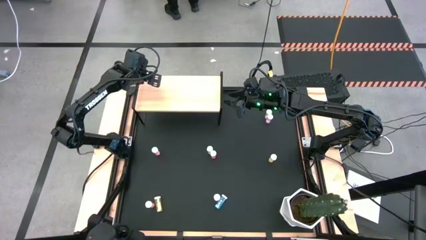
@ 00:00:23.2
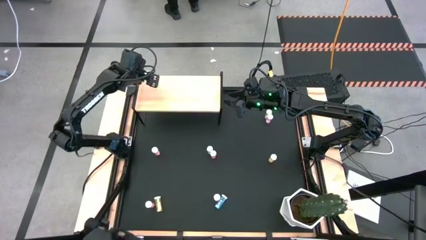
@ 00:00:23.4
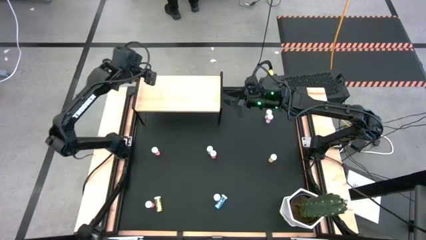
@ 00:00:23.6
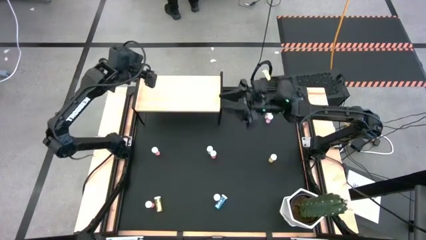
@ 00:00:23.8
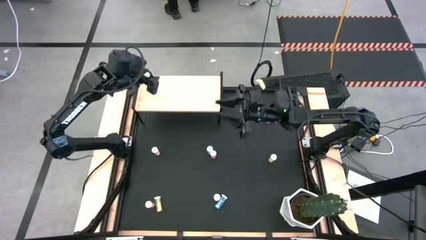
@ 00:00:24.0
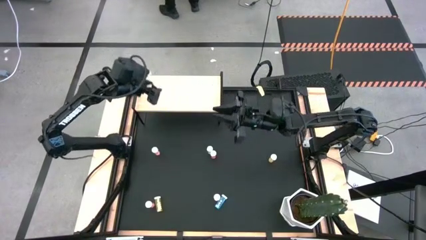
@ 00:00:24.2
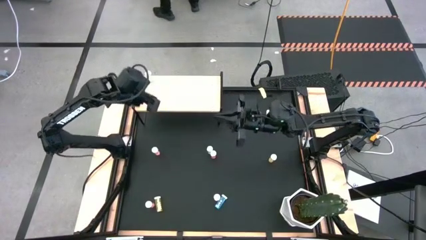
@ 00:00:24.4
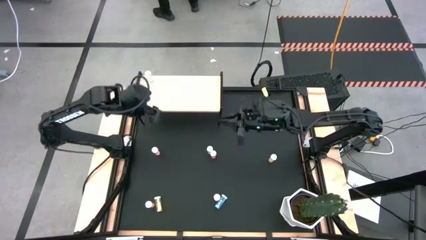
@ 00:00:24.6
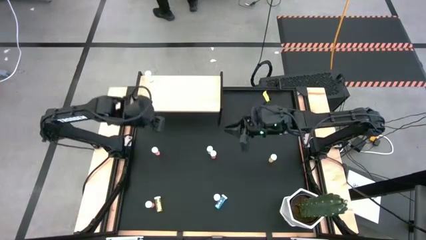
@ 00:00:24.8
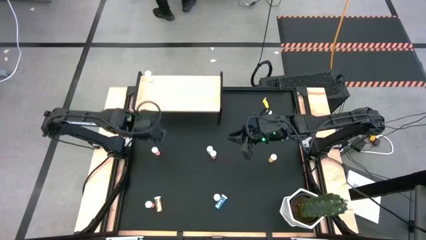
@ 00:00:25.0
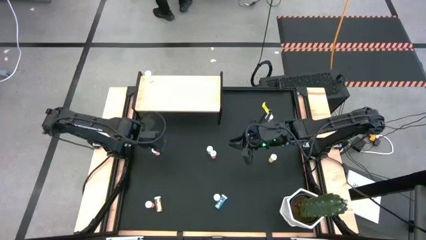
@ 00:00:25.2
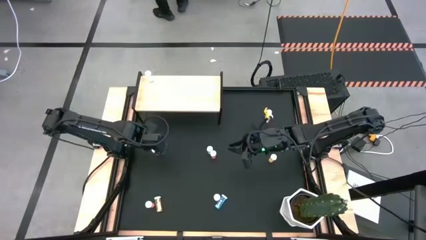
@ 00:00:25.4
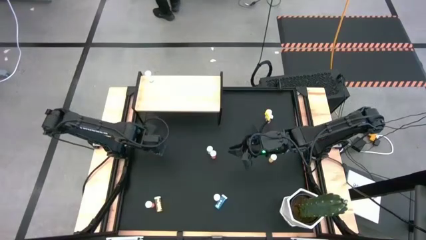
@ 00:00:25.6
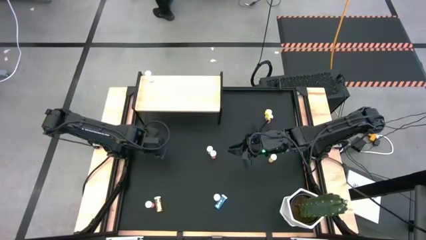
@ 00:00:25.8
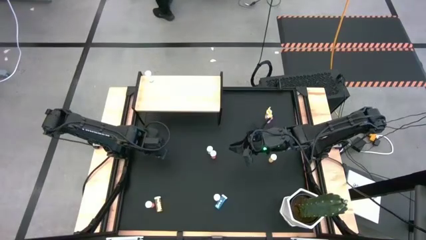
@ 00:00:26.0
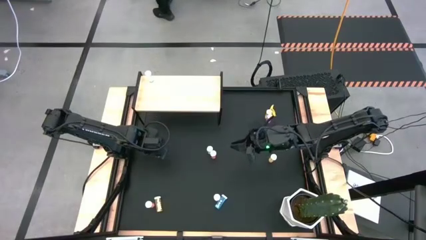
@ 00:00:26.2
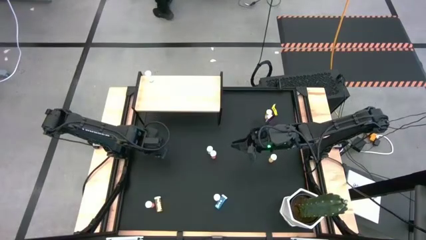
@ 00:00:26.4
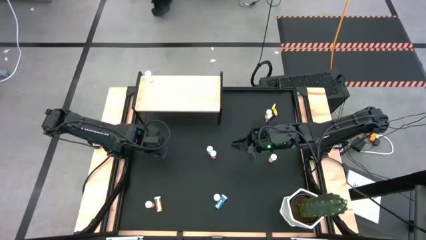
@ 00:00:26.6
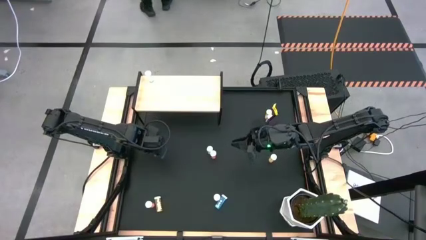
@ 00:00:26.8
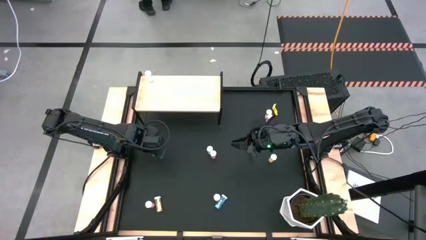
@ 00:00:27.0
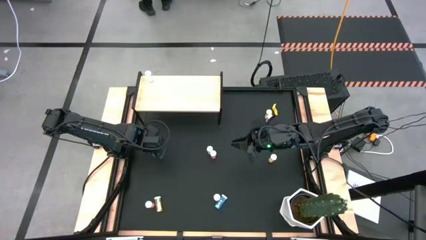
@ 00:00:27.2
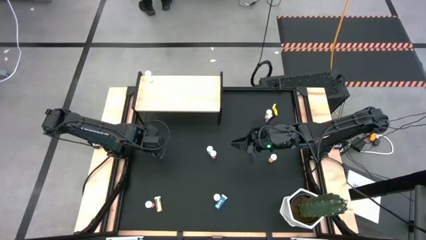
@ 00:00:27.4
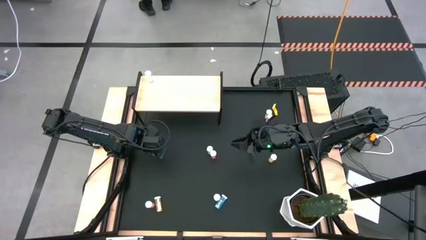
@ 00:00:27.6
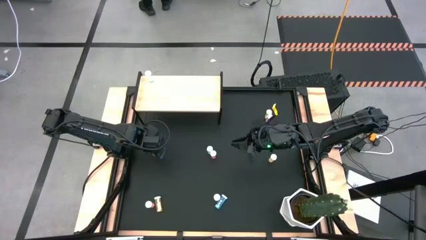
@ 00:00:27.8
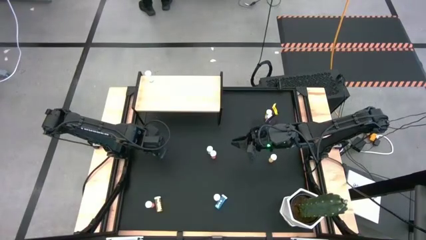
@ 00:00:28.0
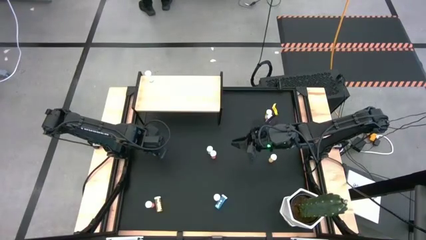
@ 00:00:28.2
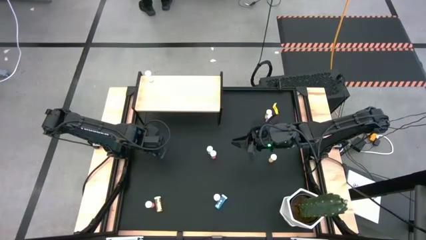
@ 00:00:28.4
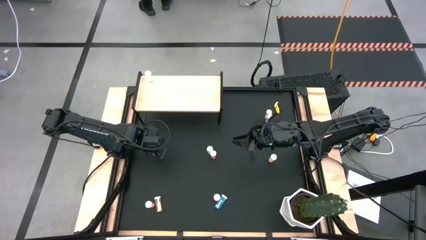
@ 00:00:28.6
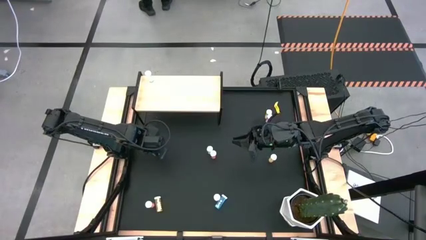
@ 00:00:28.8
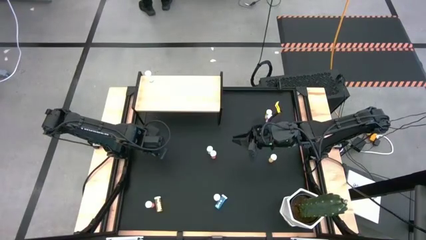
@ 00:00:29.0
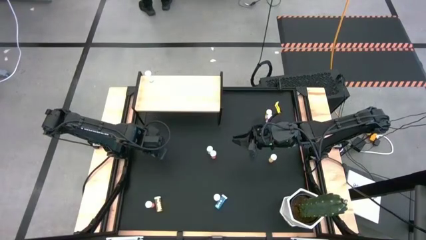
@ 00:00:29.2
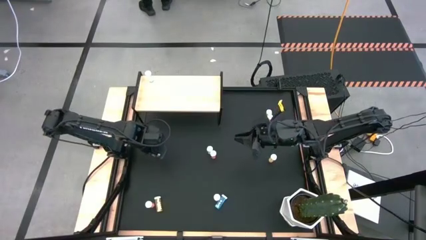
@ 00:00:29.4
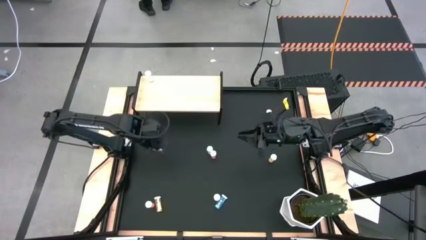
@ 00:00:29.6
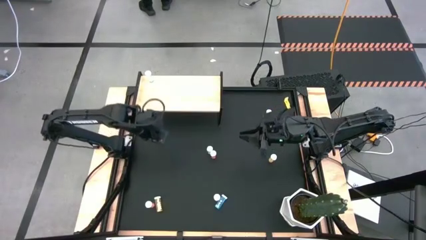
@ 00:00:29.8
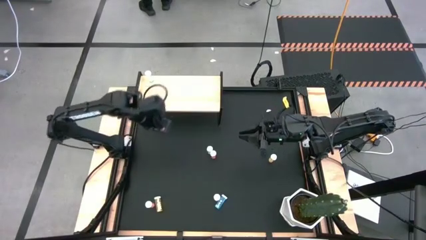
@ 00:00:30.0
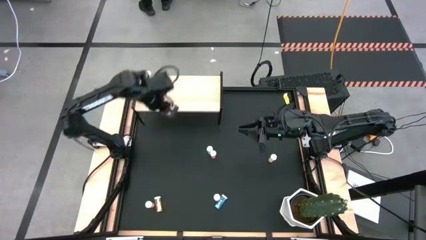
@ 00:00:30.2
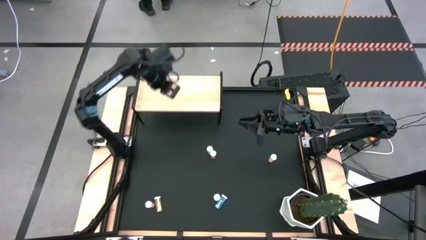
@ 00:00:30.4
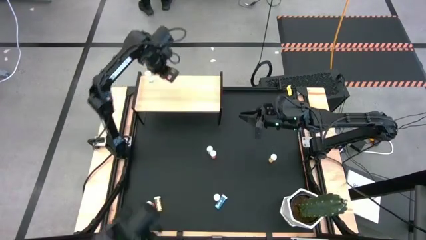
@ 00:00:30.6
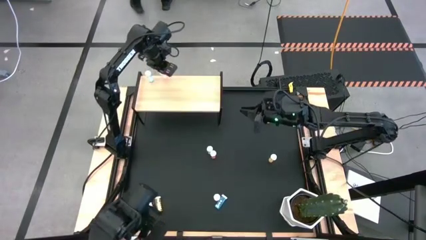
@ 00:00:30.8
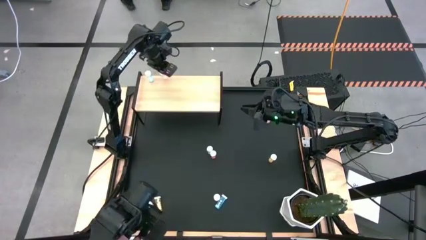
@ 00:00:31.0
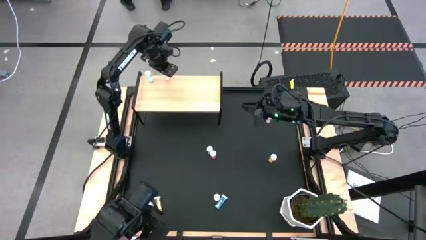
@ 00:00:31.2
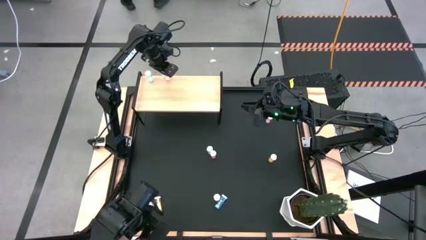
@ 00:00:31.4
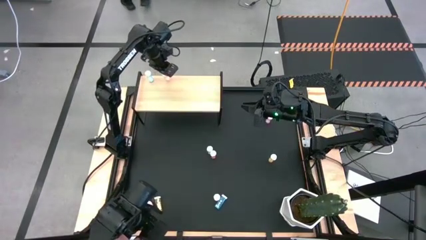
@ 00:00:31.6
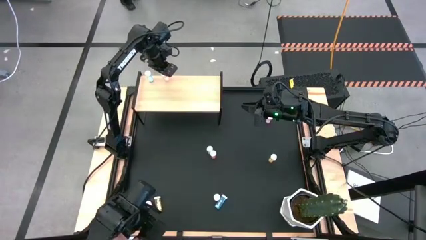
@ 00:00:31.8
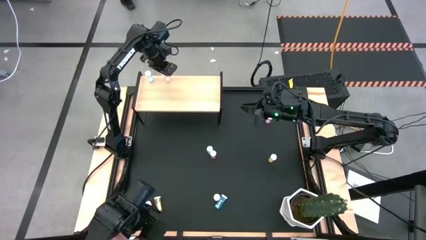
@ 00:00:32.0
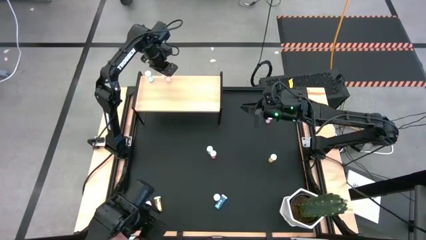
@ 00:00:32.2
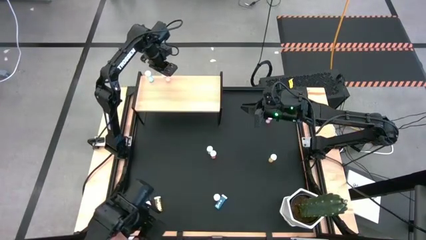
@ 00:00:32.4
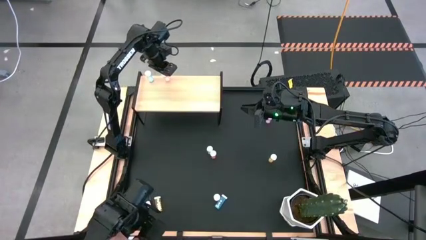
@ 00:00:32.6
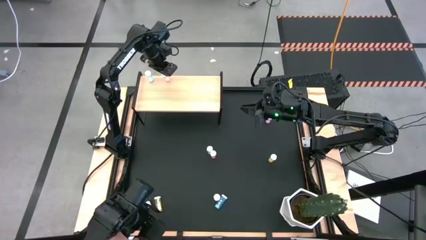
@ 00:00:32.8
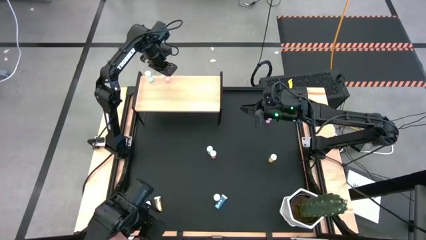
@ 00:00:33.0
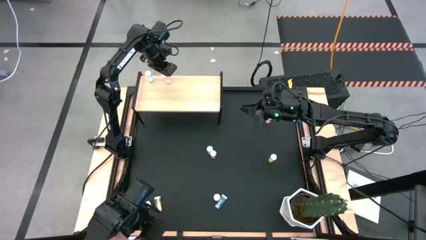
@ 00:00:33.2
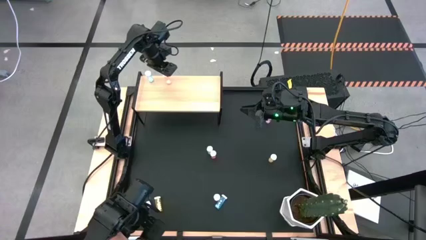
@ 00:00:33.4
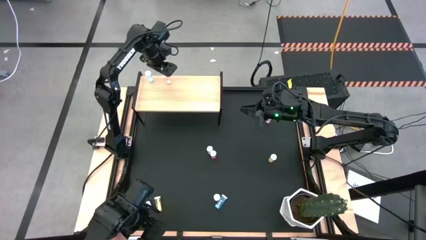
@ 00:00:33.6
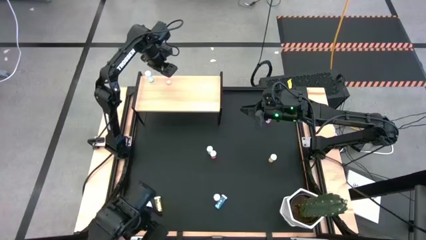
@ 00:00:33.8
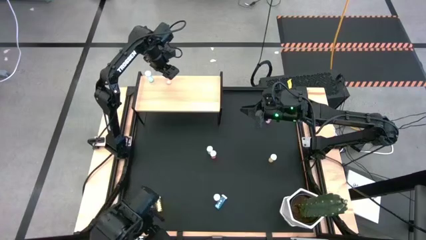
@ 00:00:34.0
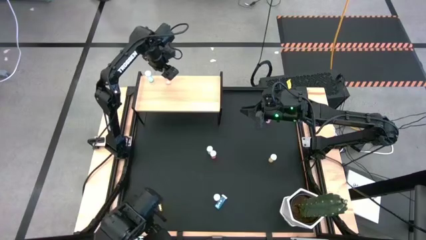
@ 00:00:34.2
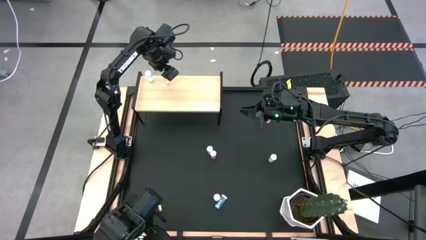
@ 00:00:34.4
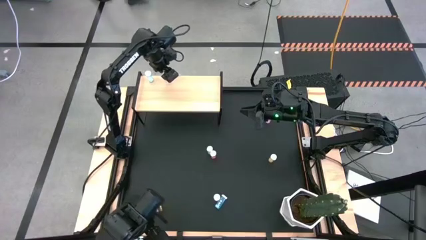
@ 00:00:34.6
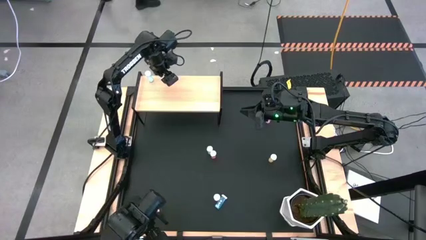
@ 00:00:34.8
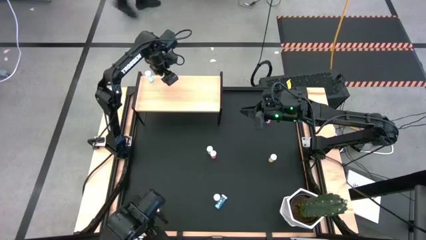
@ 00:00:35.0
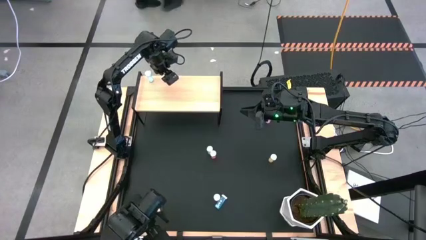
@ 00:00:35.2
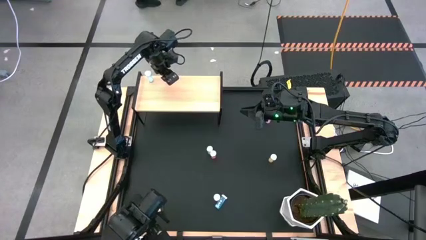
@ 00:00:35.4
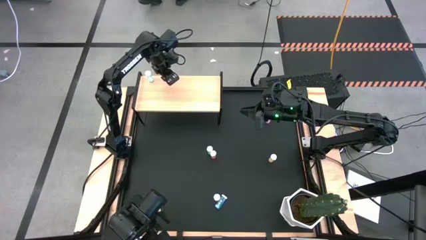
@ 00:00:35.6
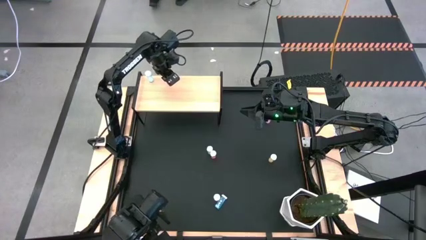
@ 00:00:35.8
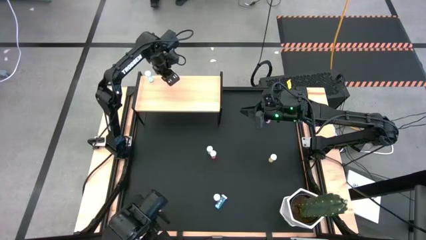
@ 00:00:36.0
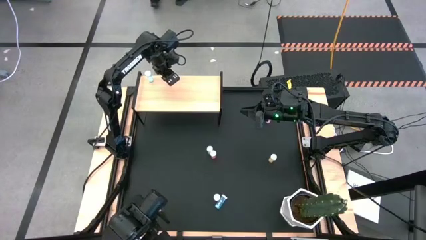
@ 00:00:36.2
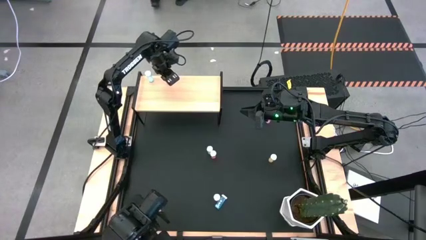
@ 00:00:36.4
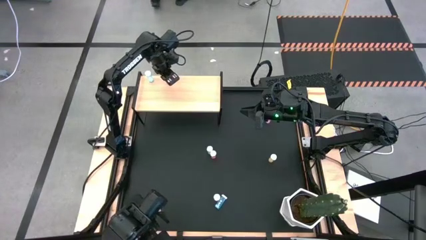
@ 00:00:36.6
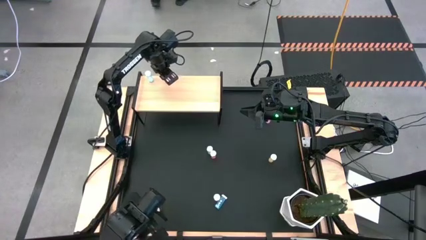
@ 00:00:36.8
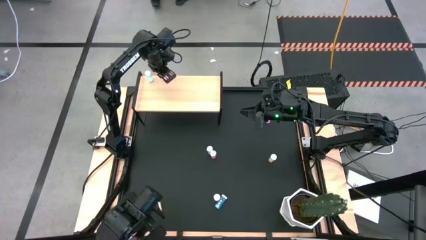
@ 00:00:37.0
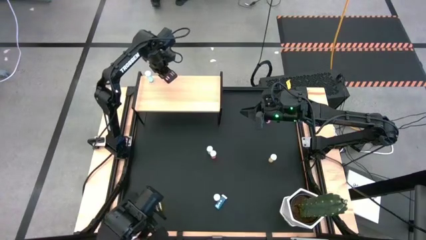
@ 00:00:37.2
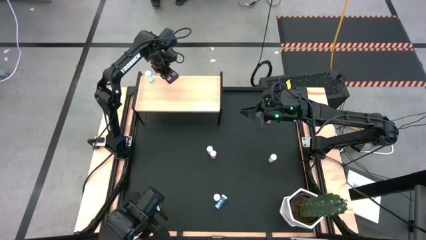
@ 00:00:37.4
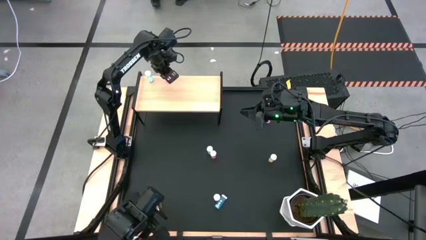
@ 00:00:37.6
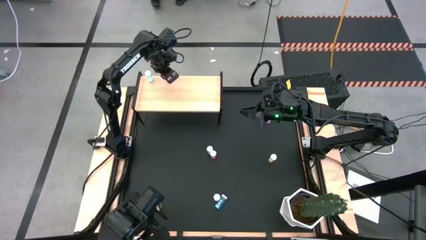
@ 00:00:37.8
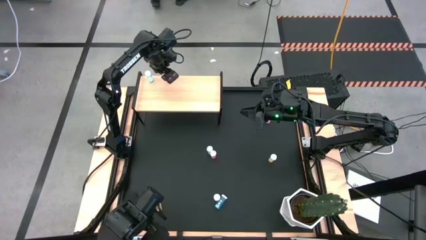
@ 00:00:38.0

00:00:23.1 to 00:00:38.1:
Task: Pick and place medicine bottles onto shelf by color
Put the top left red pill bottle on the shelf
